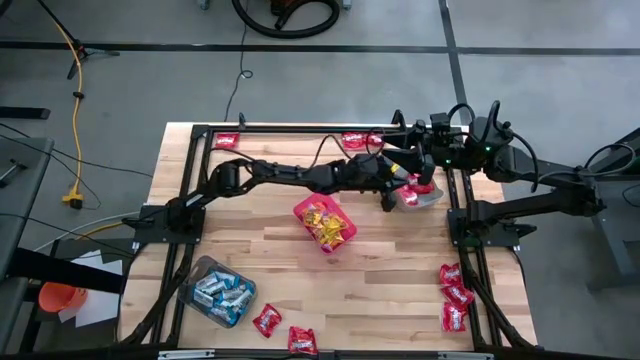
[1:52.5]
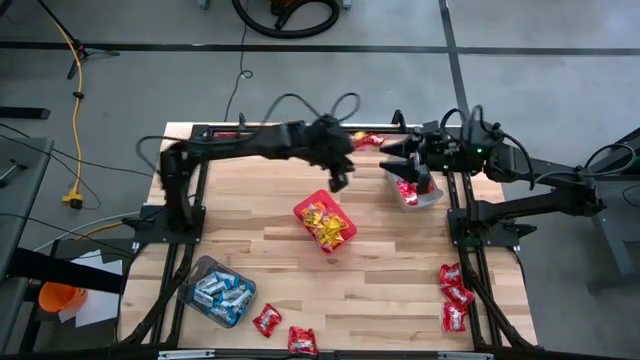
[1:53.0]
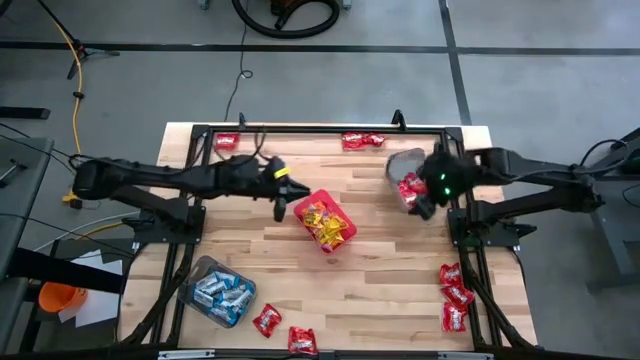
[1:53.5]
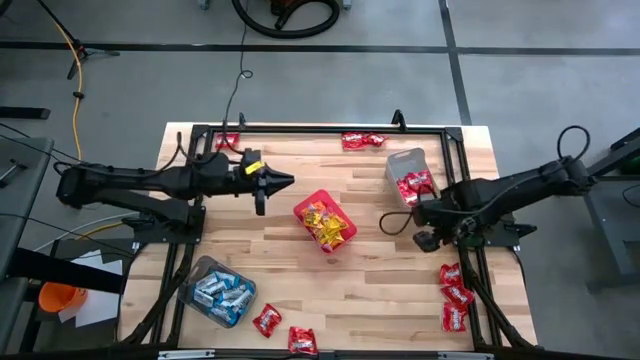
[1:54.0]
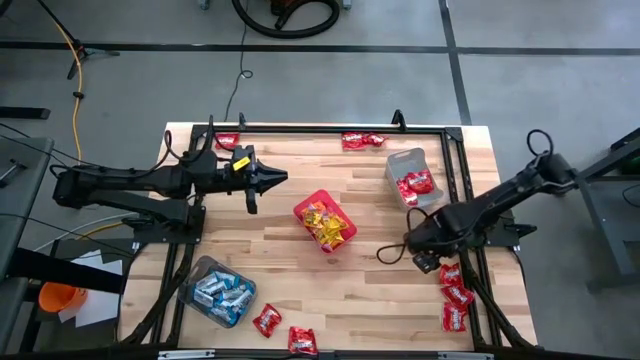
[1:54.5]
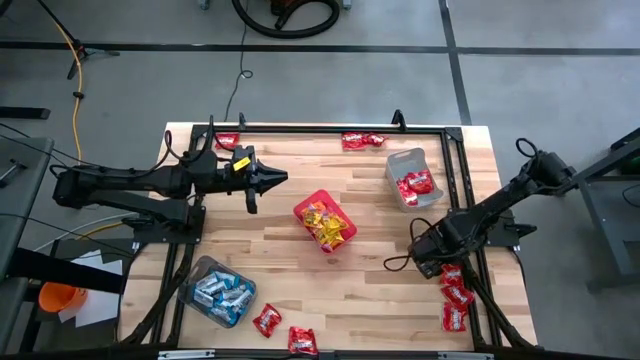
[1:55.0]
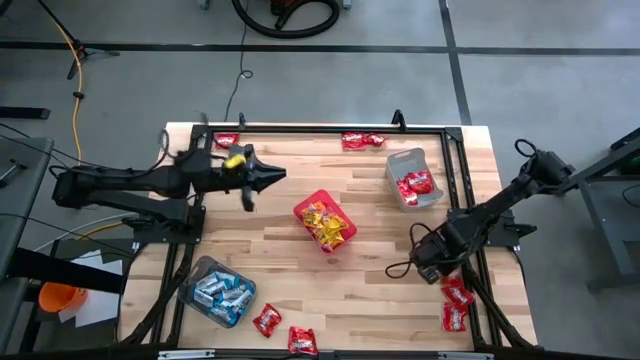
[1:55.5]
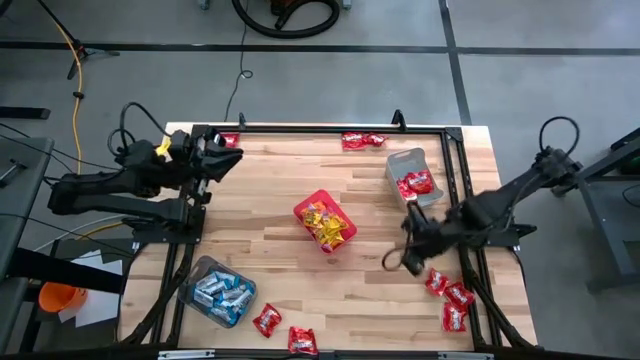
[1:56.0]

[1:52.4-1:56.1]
Task: Sort candy
Put the red candy into the gray bin

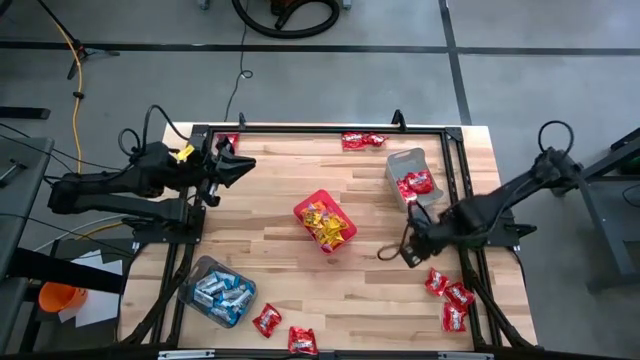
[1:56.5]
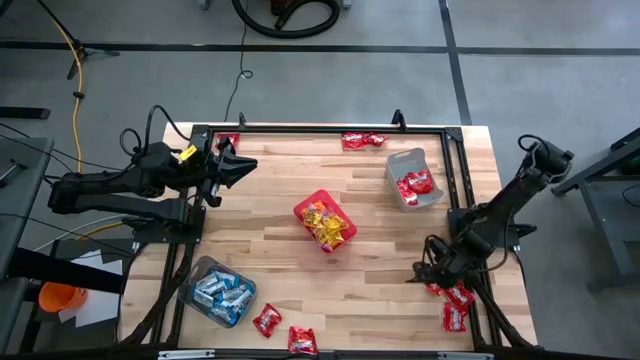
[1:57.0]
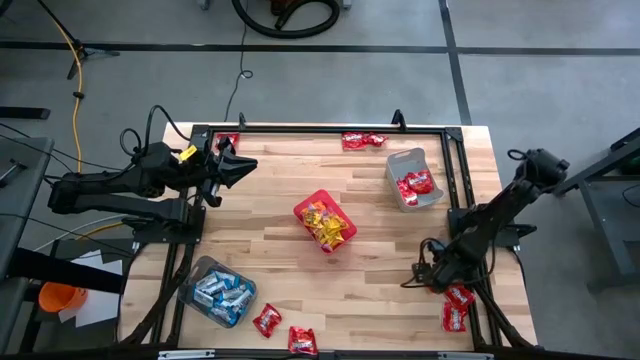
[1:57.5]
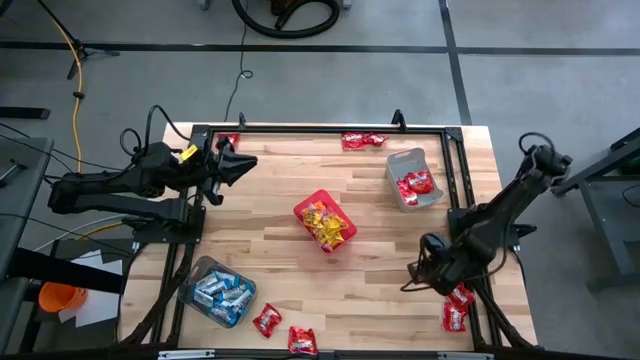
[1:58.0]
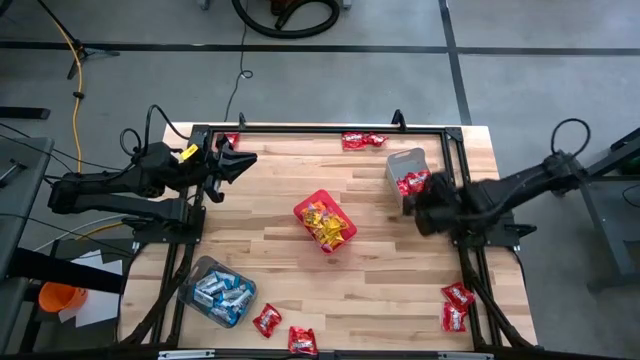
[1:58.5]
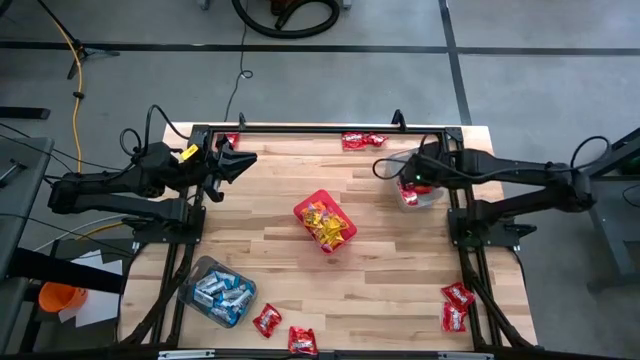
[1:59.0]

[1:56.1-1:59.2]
Put the red candy into the gray bin

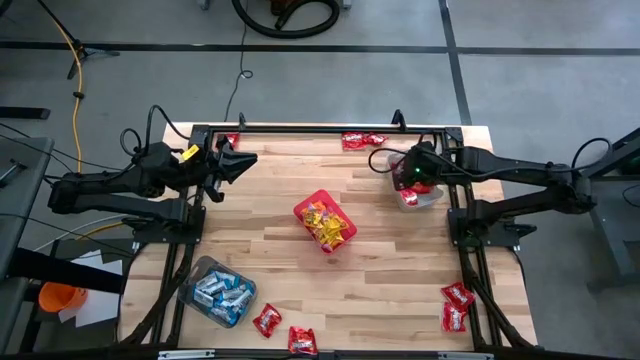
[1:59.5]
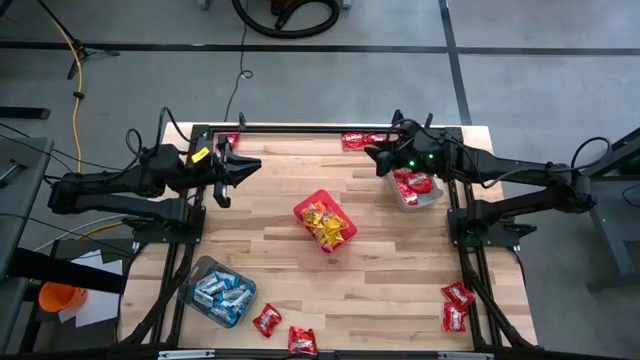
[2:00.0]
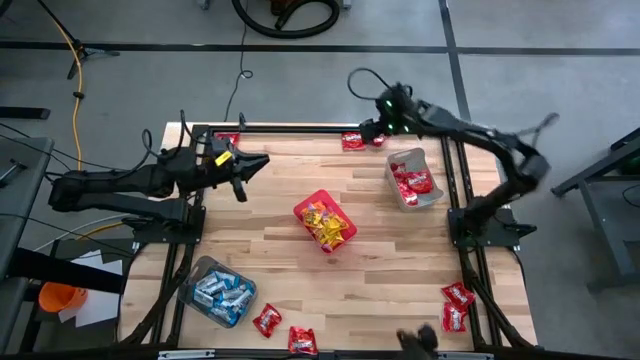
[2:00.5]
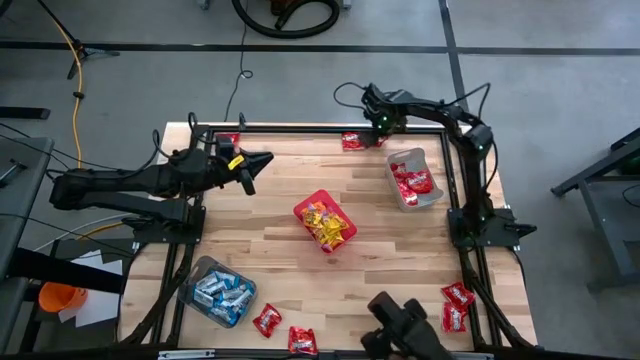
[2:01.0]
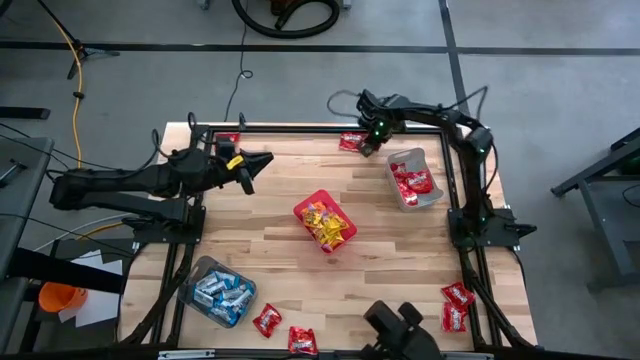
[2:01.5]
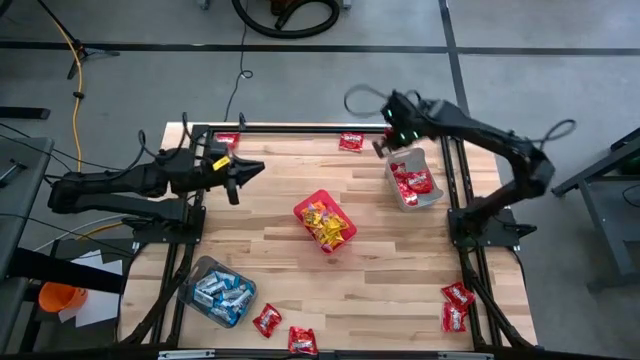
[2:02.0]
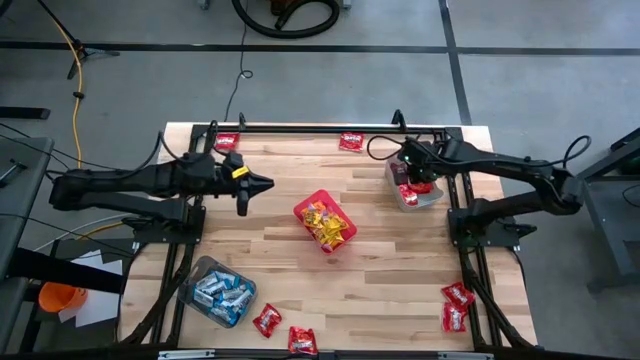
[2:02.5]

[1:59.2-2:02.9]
Put the red candy into the gray bin

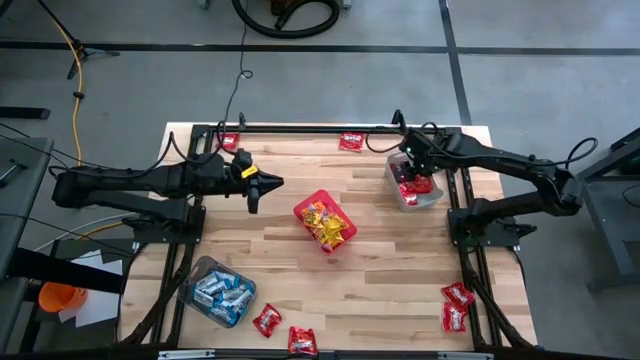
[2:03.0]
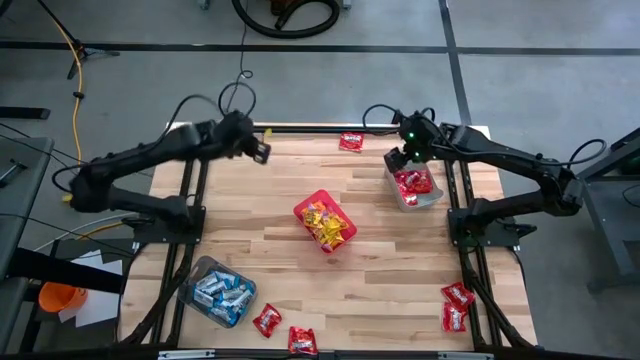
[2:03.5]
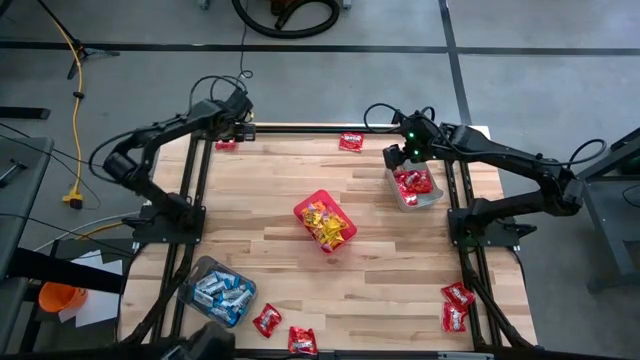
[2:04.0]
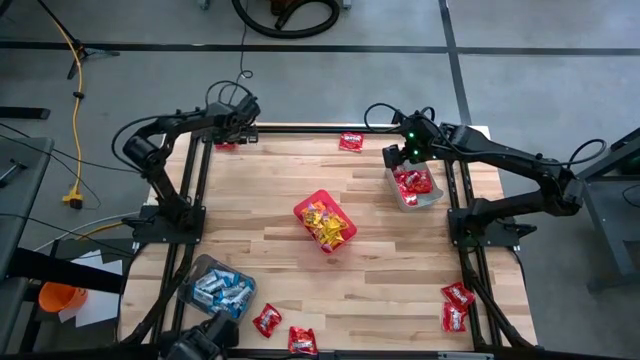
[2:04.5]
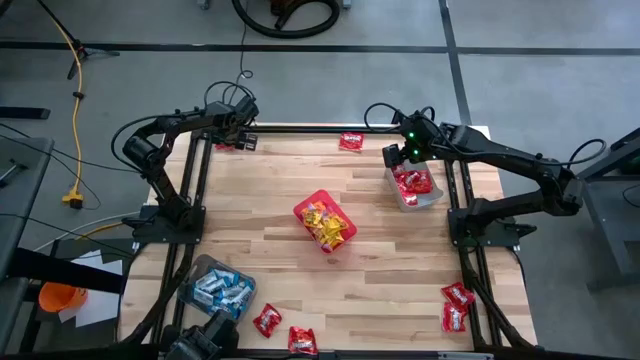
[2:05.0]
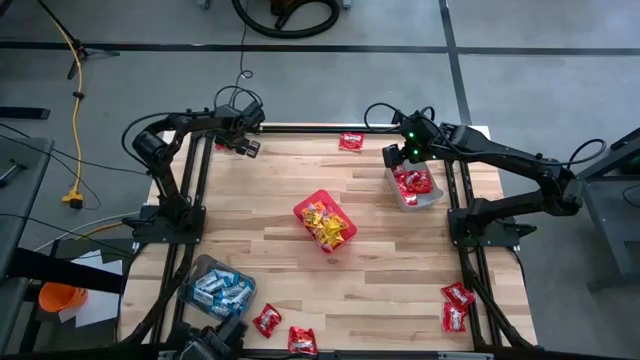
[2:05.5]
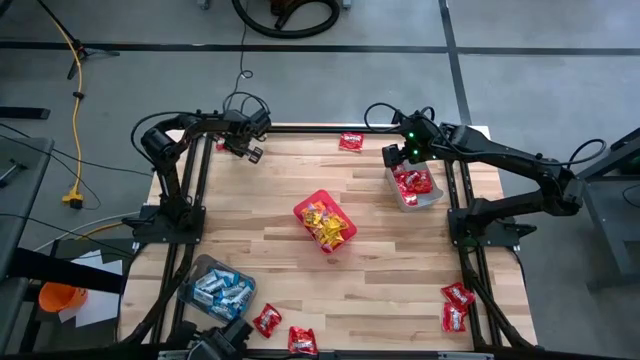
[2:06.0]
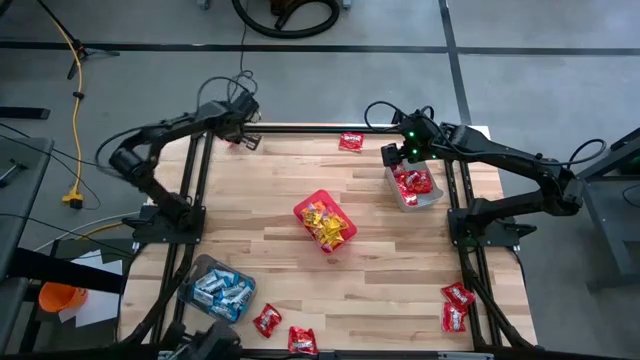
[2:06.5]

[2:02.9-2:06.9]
Put the red candy into the gray bin

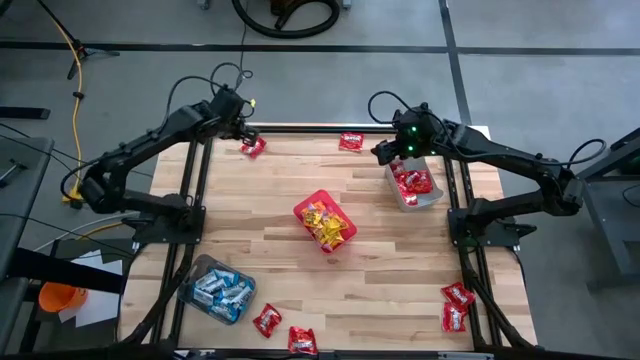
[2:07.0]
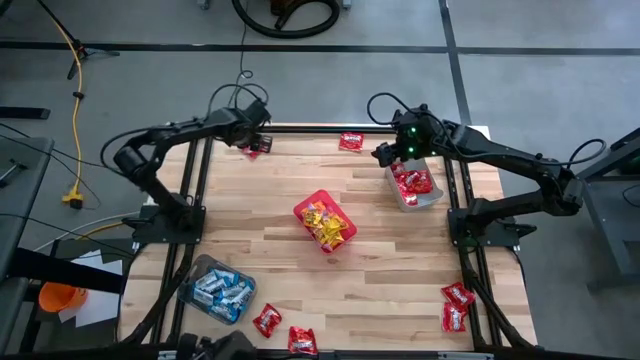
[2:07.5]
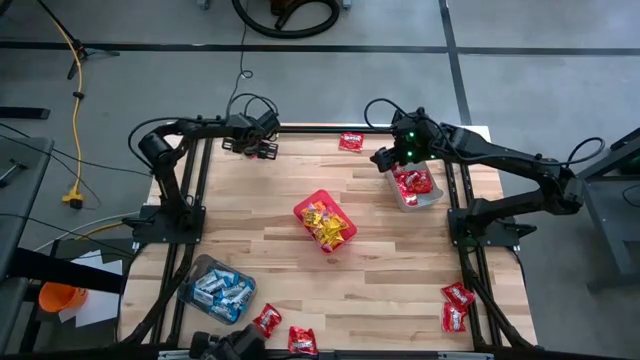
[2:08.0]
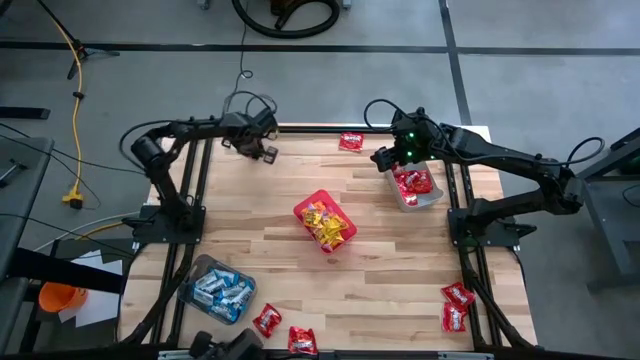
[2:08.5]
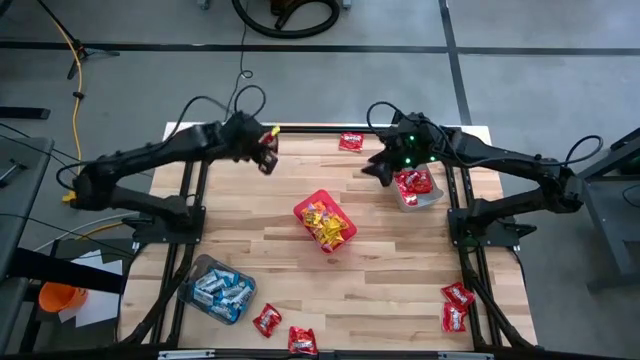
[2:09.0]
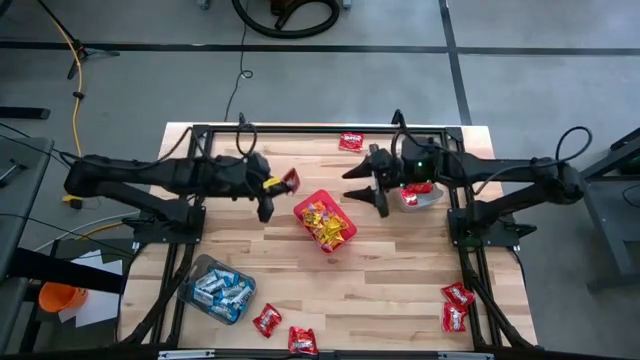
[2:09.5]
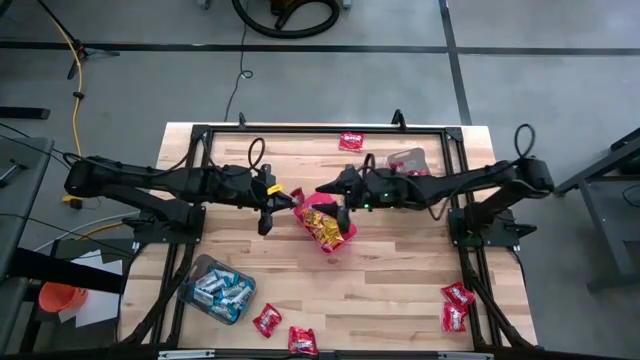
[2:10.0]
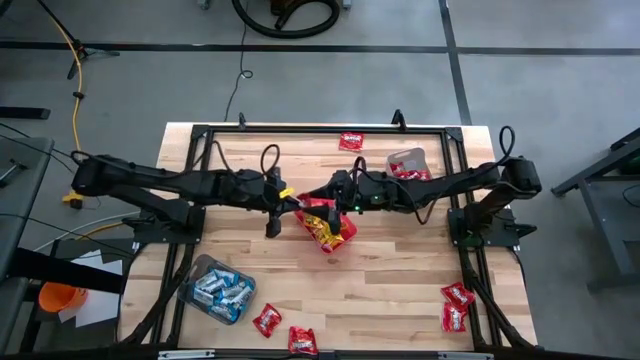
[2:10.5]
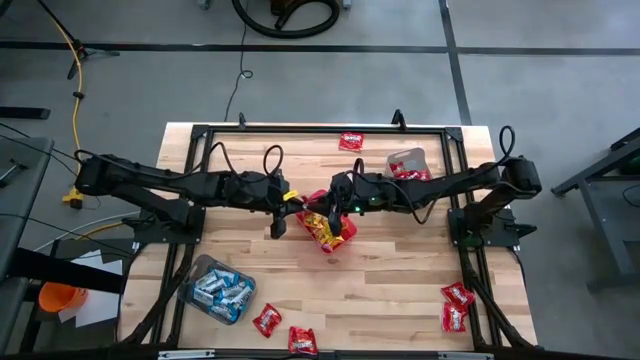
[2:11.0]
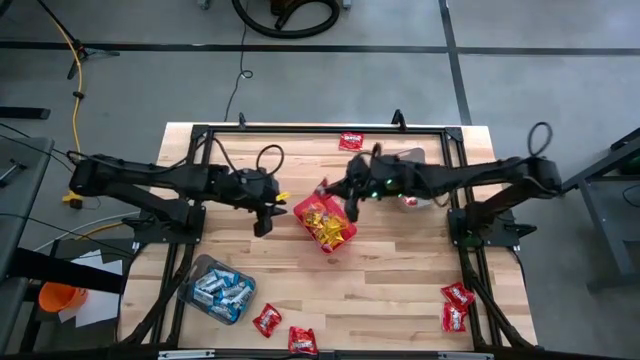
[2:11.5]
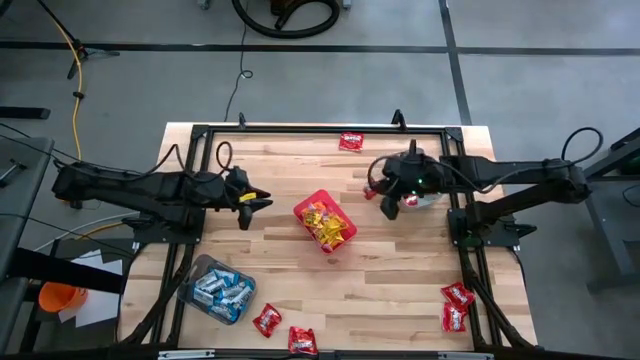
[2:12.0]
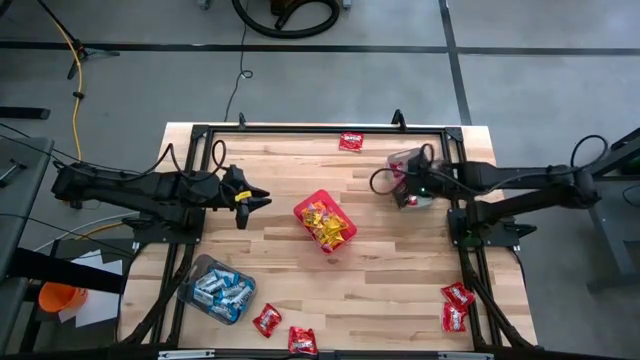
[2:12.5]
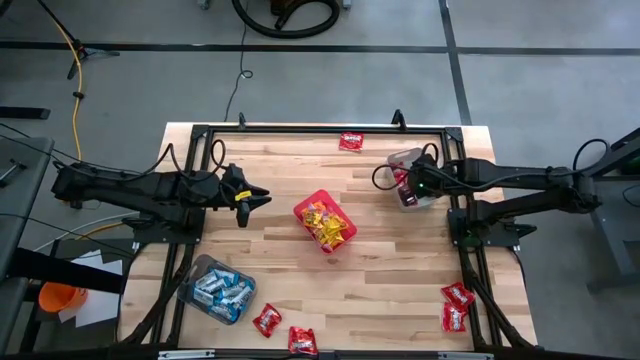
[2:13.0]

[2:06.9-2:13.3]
Put the red candy into the gray bin
